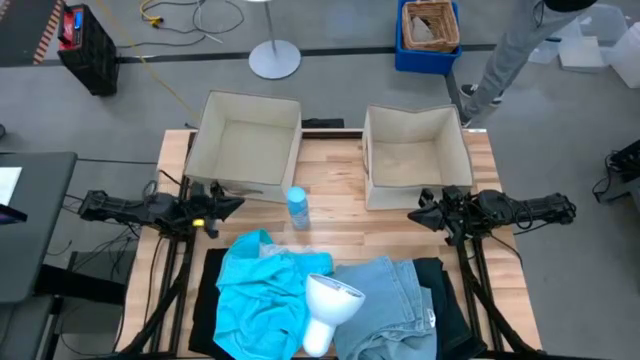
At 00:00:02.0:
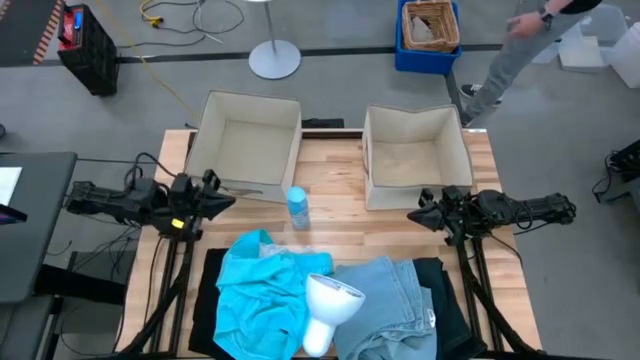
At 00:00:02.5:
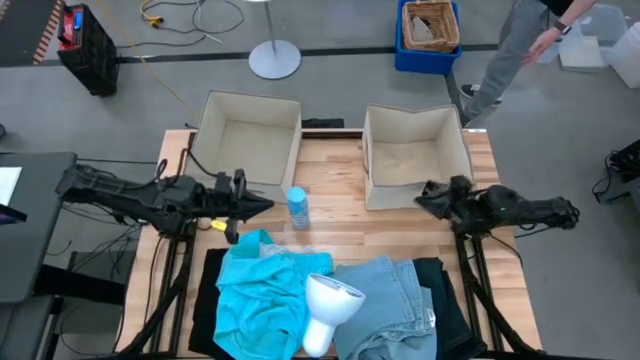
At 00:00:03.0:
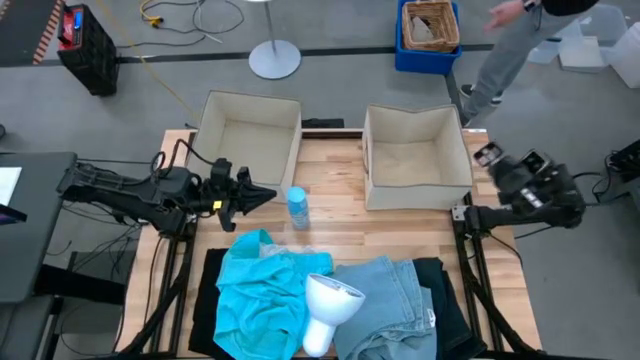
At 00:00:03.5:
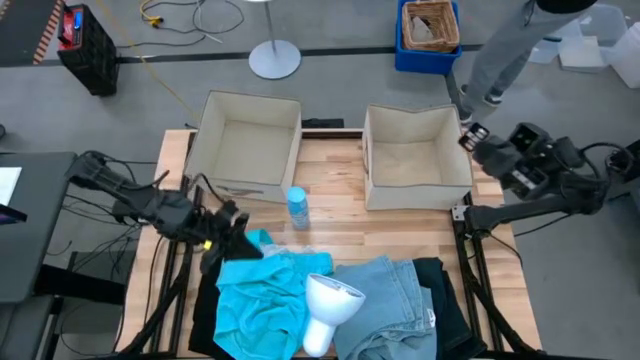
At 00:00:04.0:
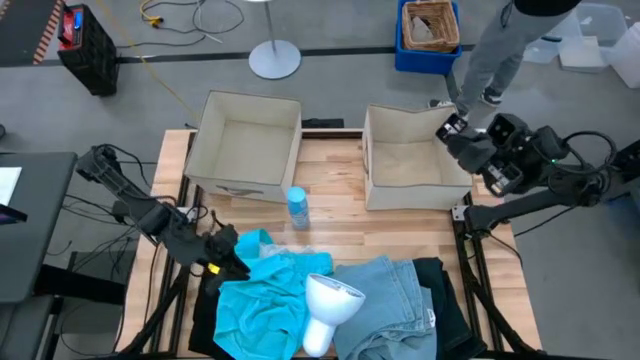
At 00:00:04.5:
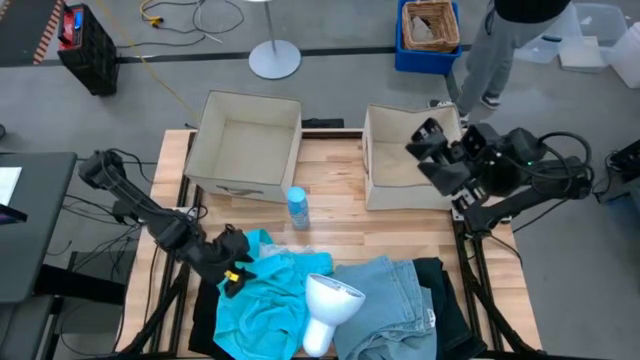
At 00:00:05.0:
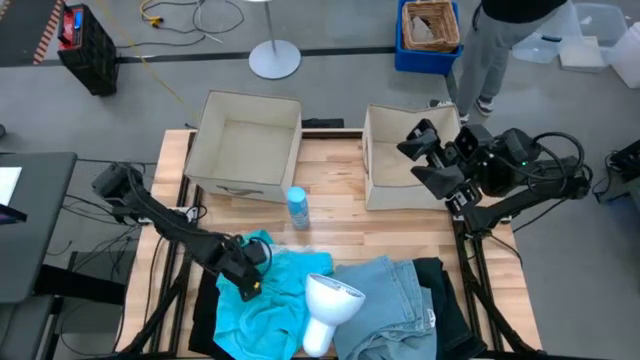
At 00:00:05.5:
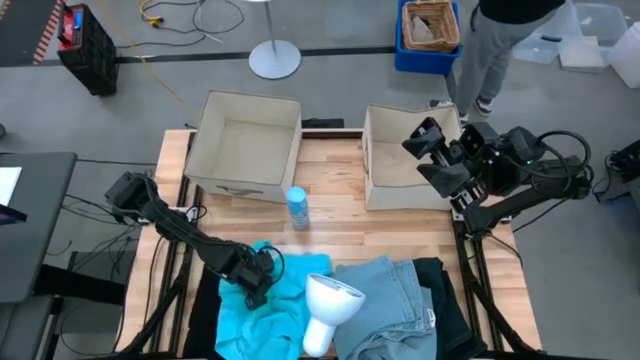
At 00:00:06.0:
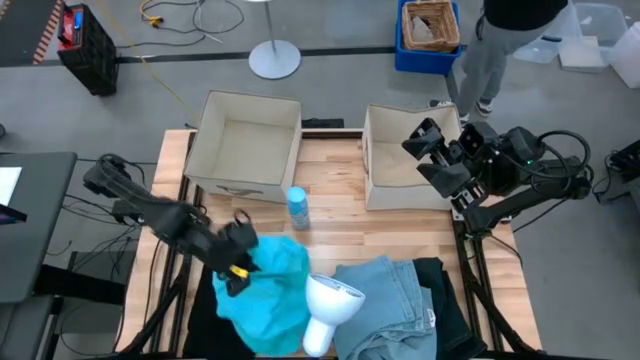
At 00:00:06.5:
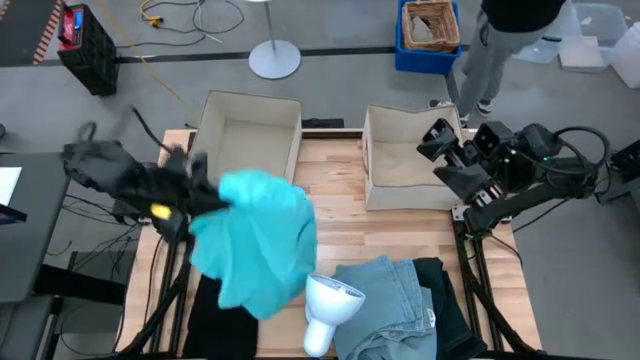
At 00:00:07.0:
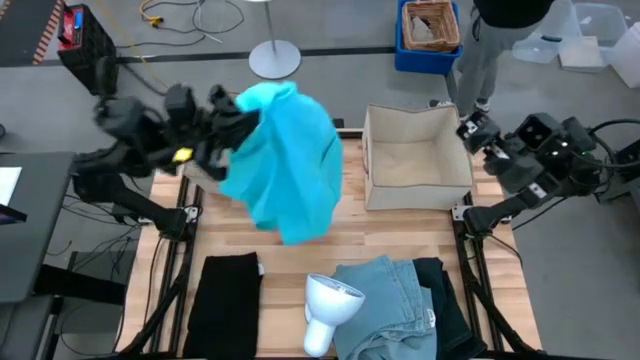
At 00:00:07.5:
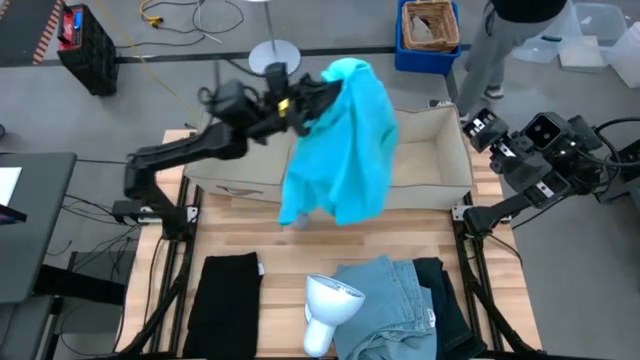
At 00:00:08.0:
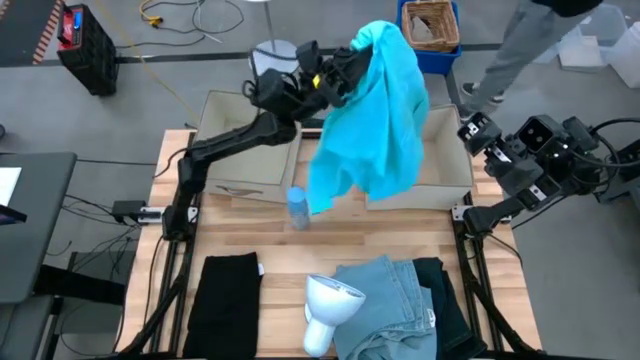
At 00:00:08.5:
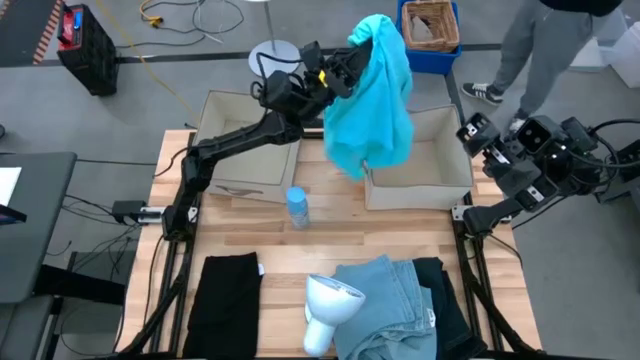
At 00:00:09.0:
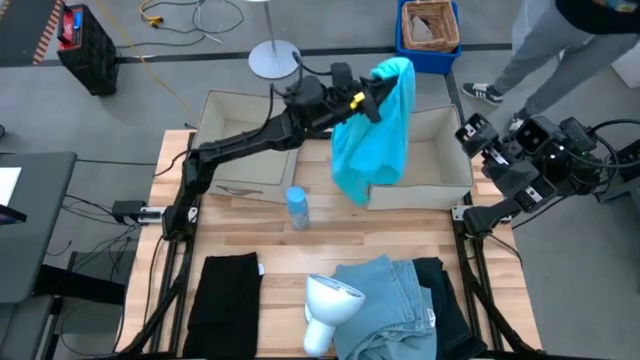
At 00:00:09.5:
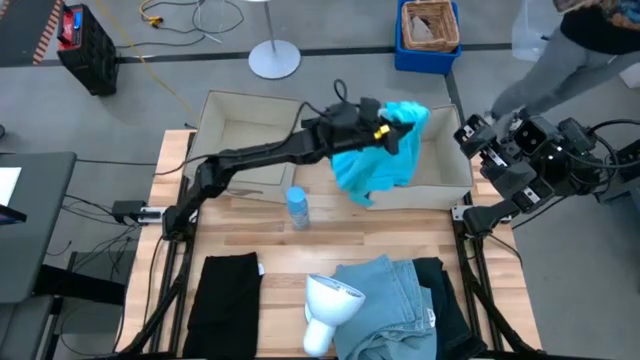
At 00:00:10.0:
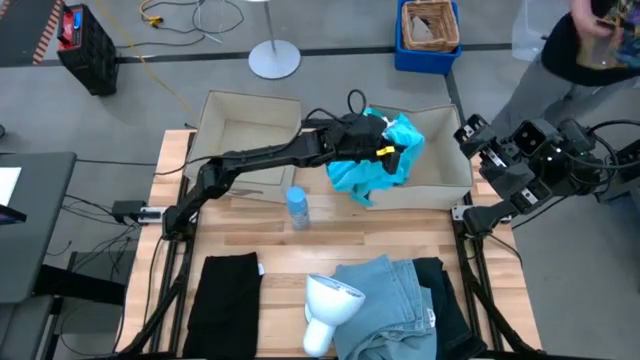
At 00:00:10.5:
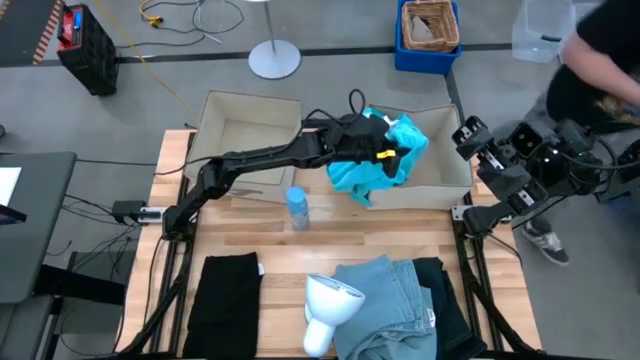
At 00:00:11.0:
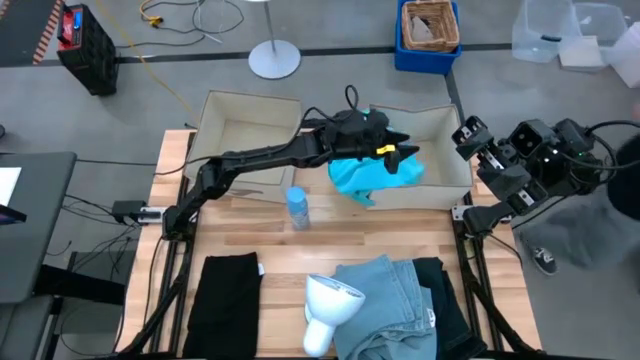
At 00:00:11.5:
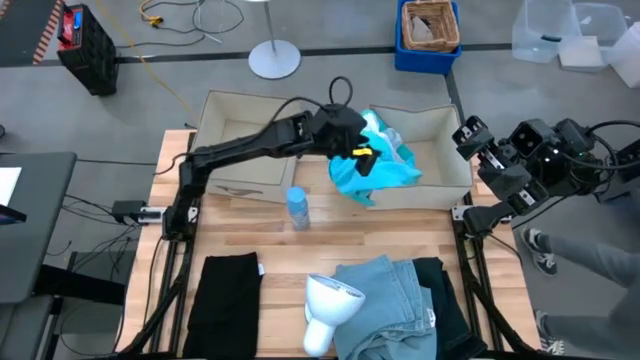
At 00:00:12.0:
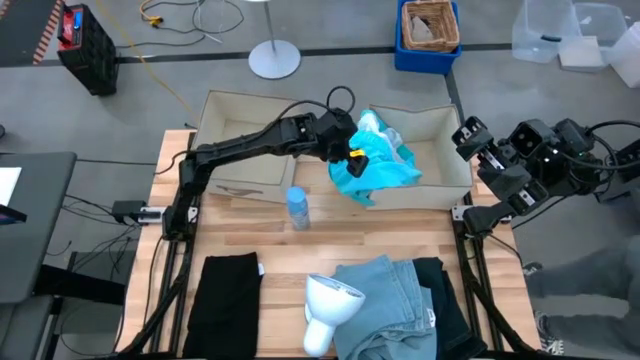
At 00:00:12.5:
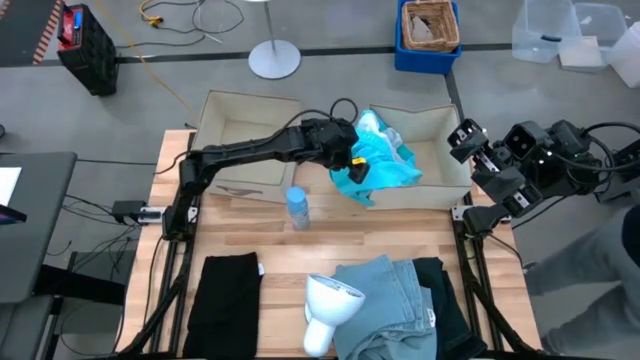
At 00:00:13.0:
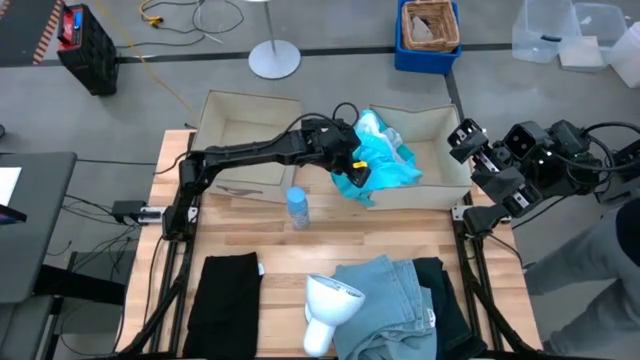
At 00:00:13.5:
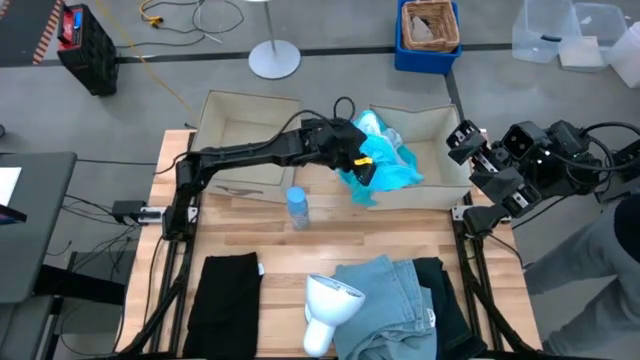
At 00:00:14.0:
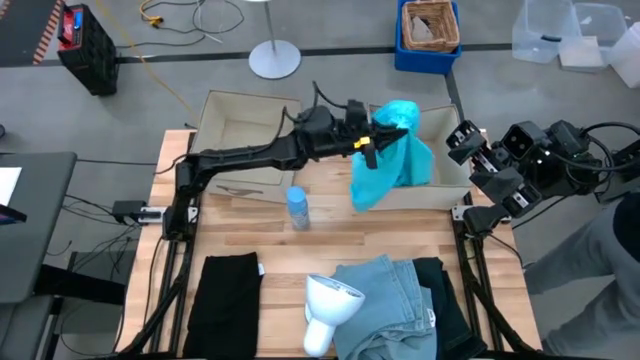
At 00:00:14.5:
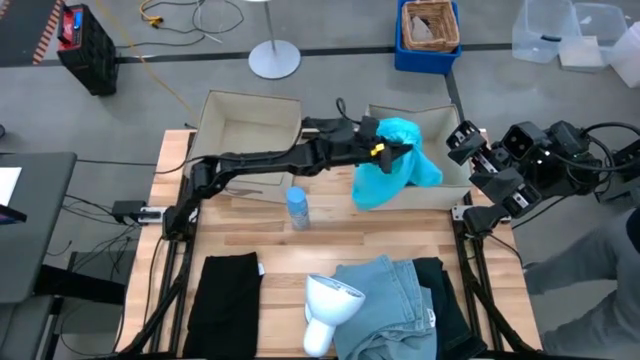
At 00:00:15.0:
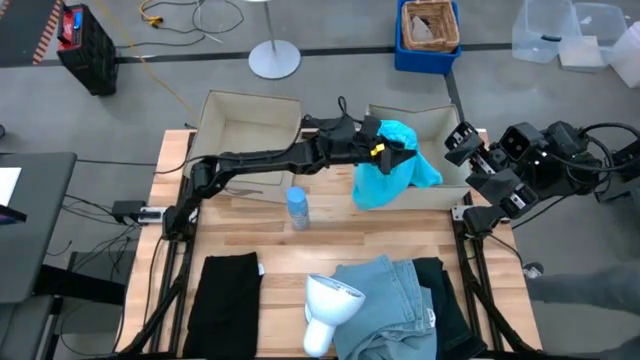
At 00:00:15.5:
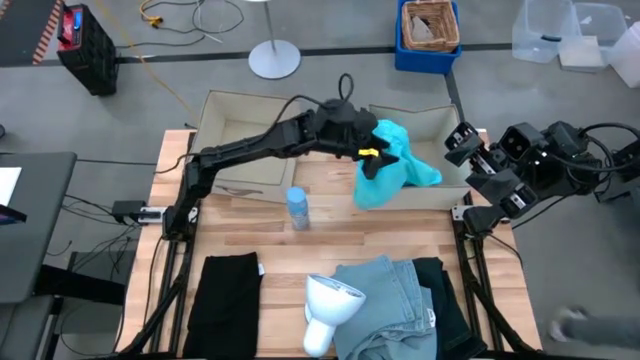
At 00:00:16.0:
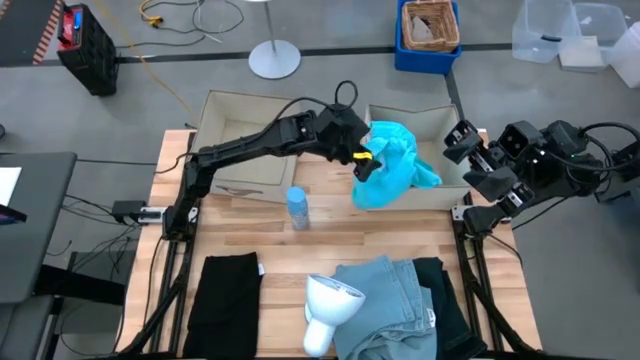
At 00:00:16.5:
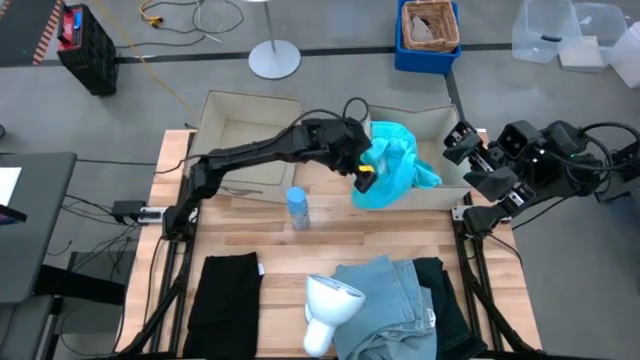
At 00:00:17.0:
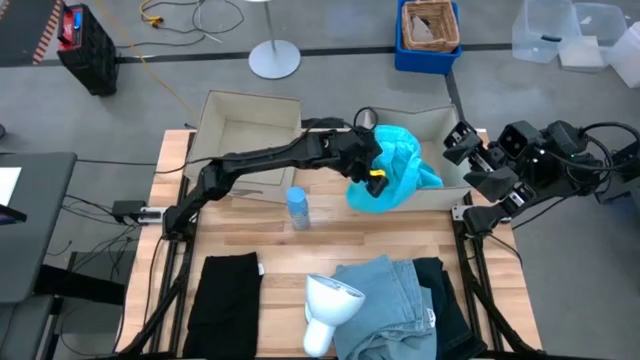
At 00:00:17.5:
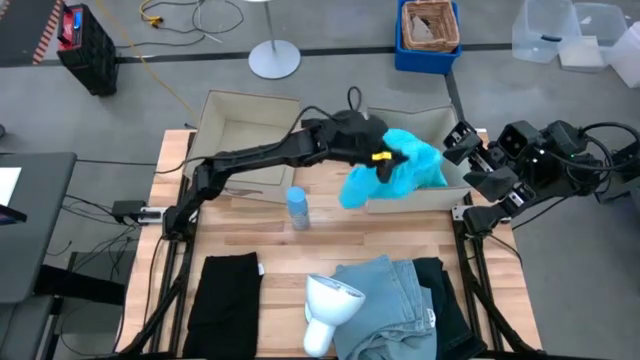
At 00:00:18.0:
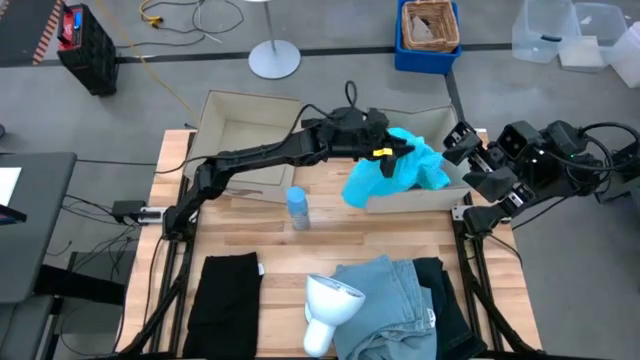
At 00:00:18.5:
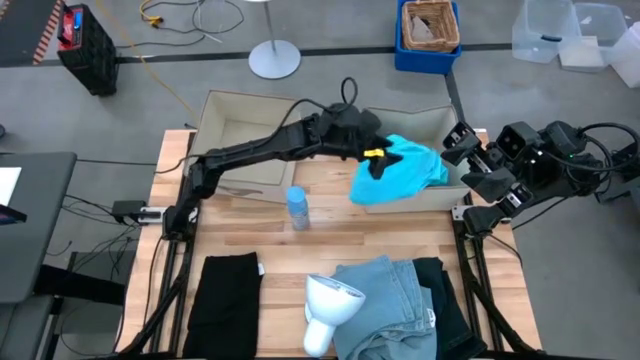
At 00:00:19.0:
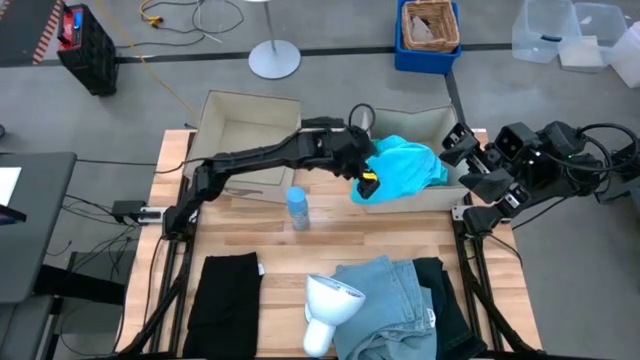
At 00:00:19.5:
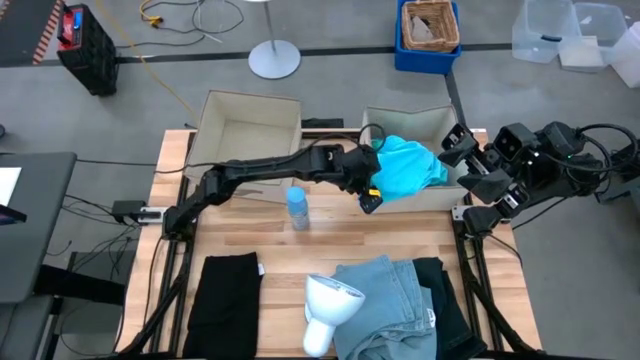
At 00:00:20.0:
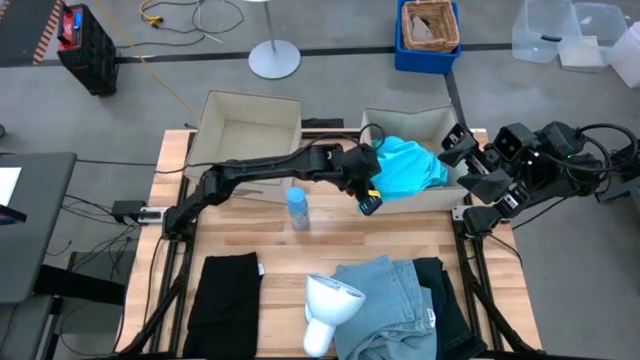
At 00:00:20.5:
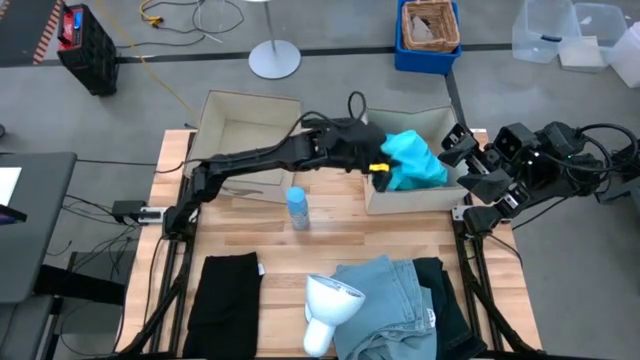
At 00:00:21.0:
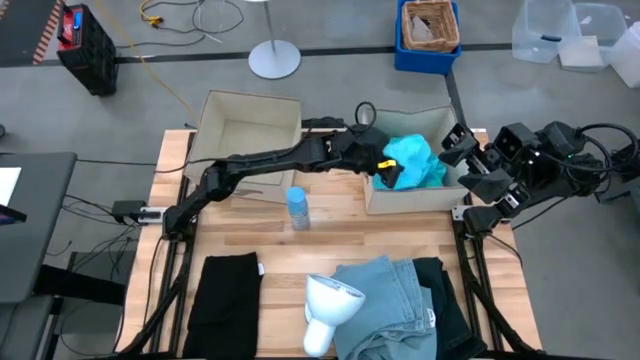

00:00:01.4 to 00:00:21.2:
Task: Sort clothes
Put the blue shorts into the right laundry organizer
